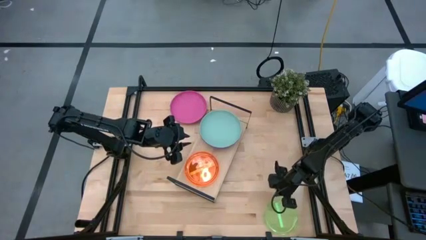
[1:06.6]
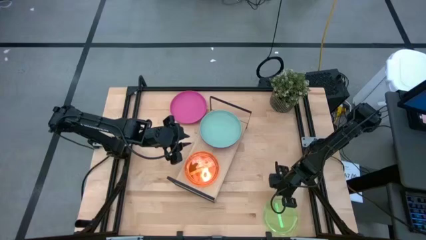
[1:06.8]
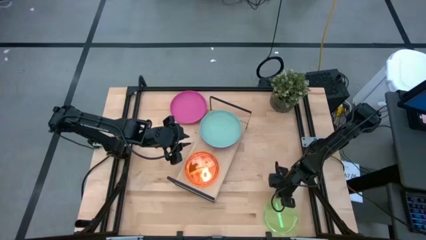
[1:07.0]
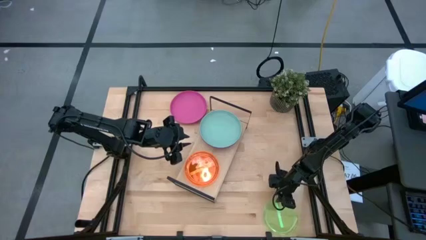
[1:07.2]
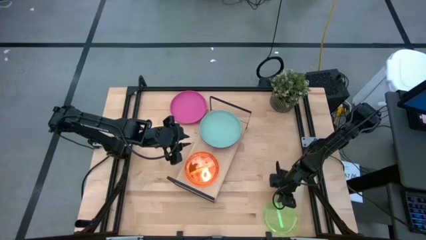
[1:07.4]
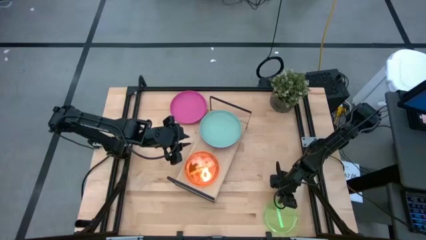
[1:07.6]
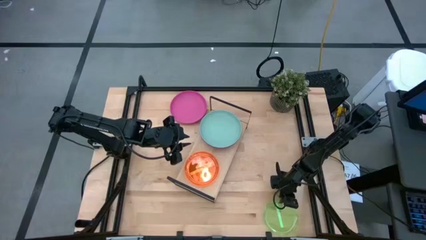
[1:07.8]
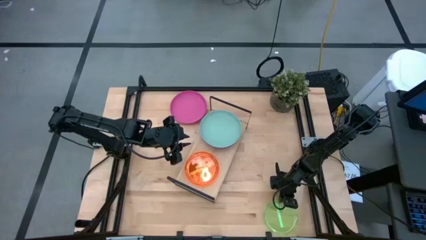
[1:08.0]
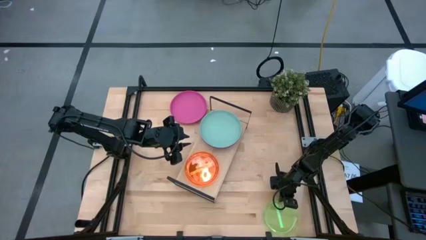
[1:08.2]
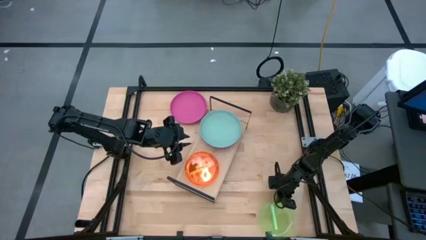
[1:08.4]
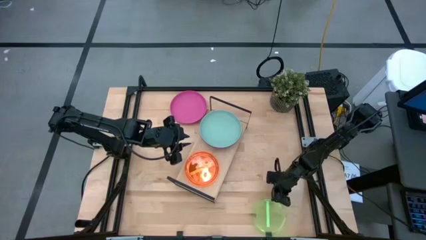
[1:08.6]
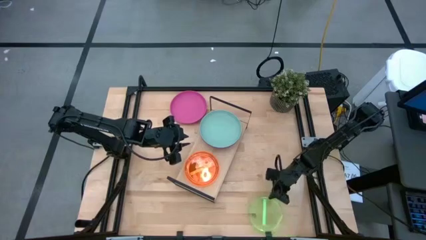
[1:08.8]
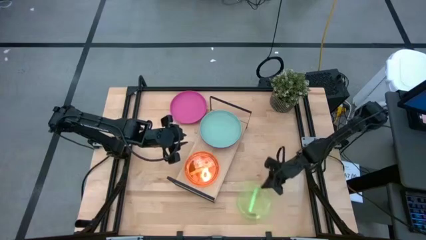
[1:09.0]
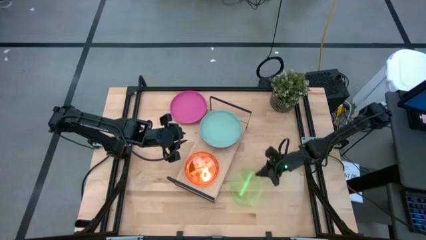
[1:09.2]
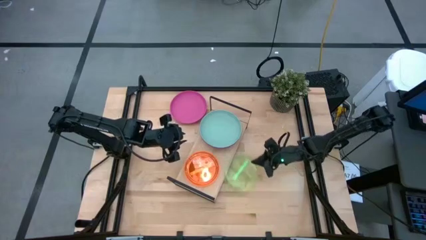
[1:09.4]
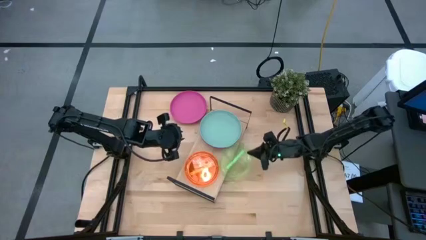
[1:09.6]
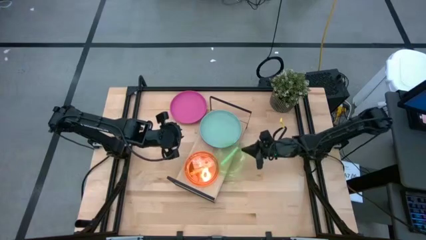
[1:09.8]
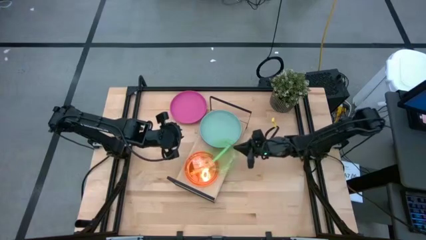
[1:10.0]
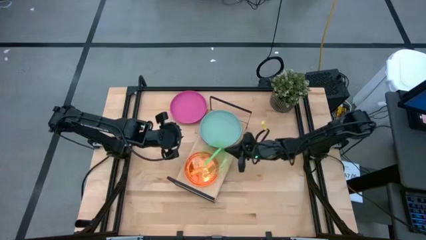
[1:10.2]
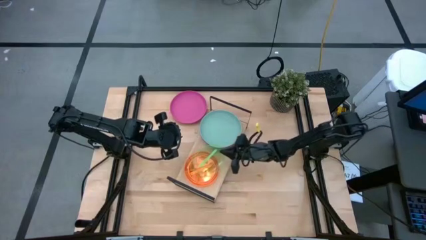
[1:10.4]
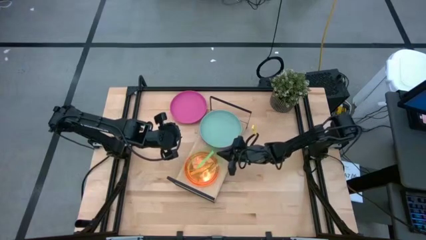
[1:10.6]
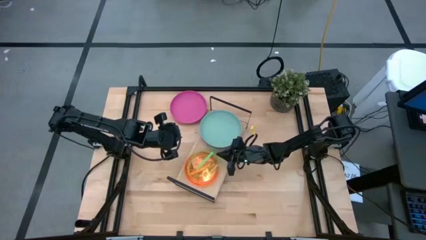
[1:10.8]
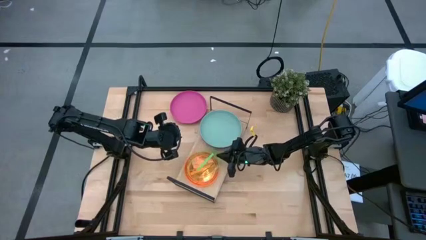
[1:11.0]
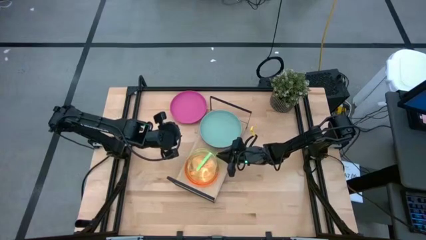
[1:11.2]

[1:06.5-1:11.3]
Task: Place and stack plates onto a shelf
Stack the green plate on top of the orange plate on the shelf

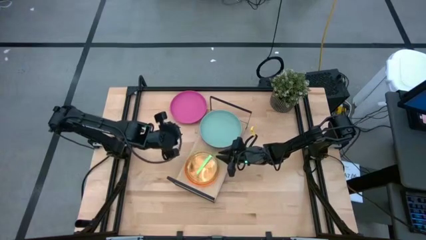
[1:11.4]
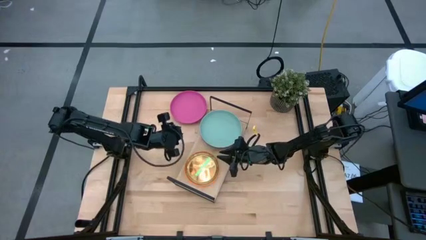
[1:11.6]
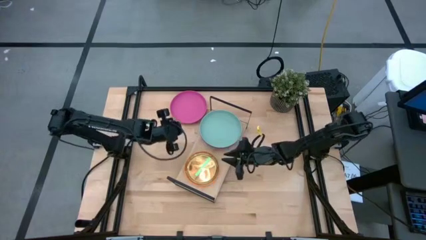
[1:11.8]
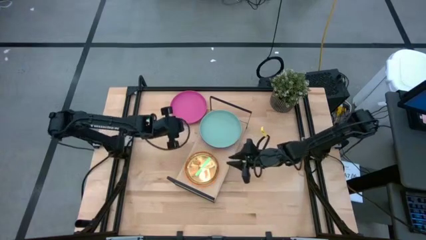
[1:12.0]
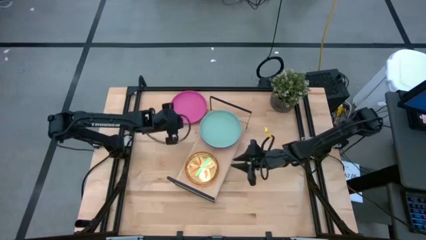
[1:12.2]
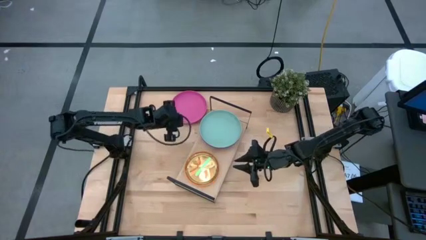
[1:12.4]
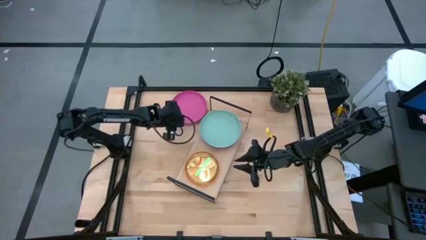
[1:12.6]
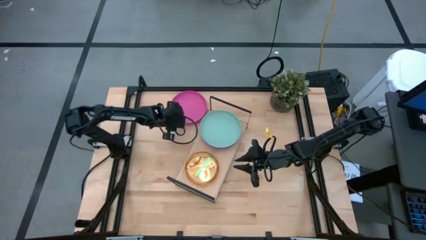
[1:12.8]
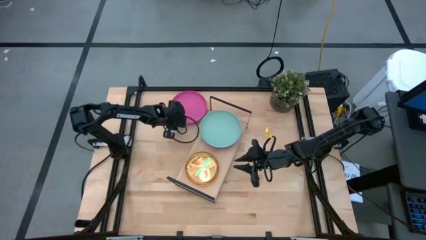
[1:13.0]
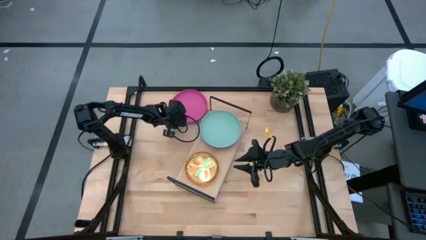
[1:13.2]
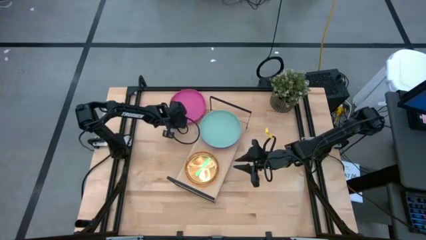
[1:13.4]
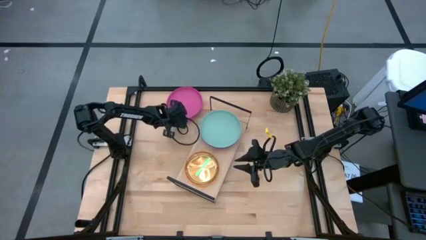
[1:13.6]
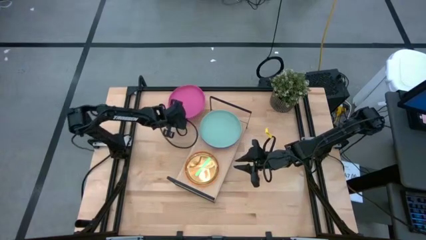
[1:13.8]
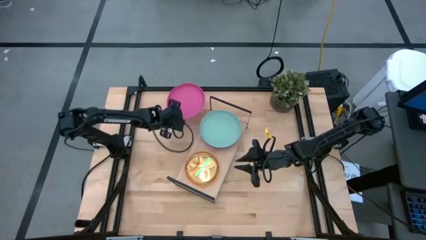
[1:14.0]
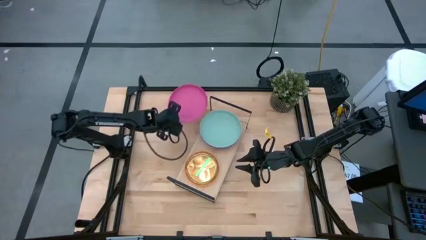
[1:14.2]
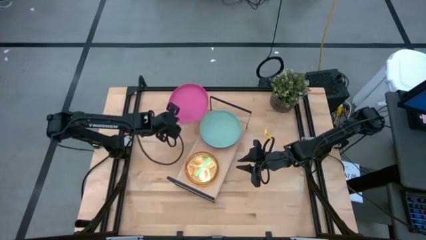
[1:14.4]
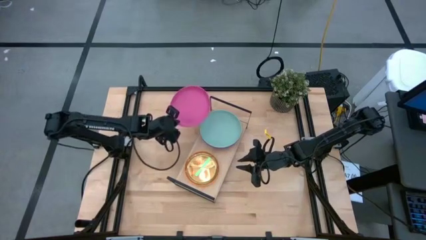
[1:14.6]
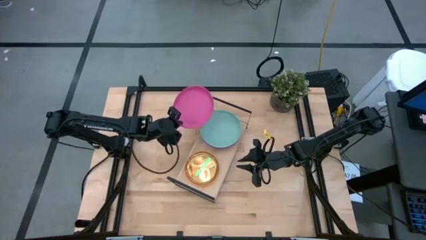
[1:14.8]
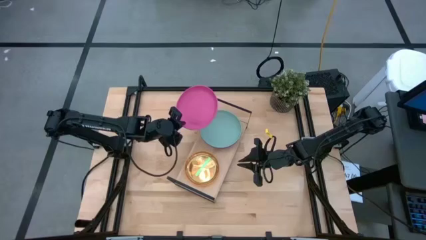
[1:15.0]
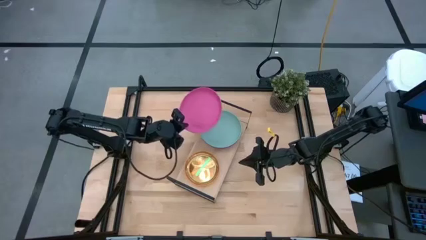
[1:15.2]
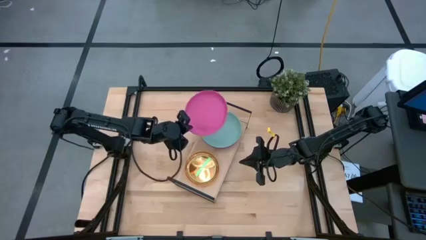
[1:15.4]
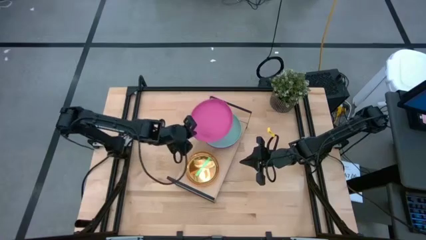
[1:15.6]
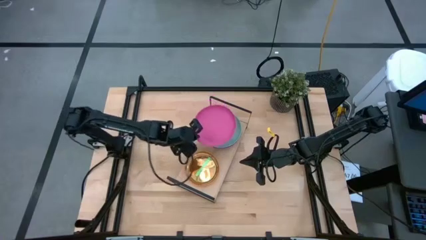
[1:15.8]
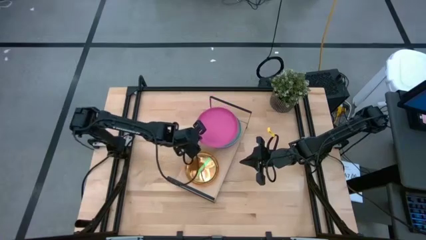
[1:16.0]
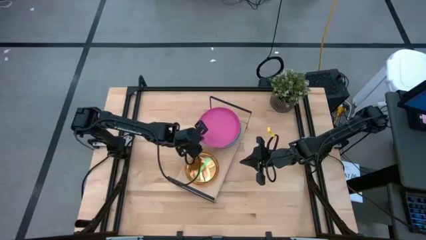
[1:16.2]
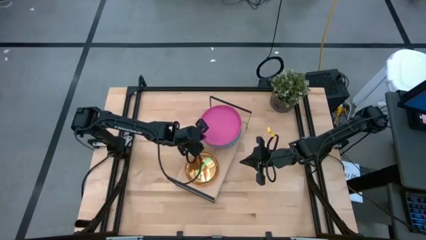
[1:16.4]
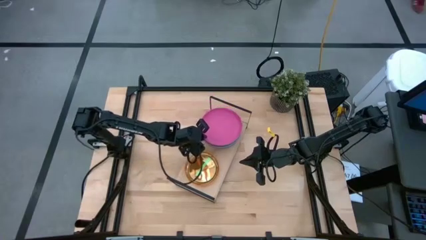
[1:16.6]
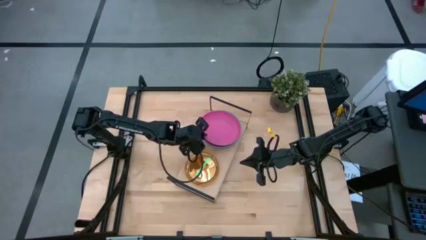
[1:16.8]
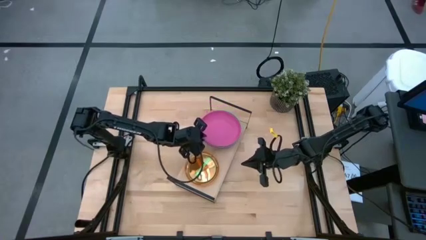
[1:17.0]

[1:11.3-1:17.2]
Stack the pink plate on top of the blue plate on the shelf

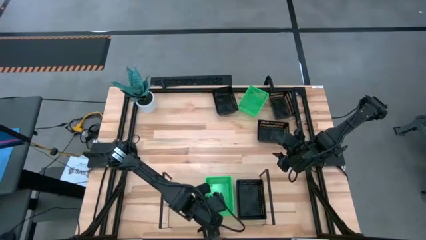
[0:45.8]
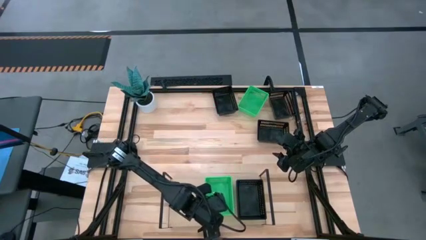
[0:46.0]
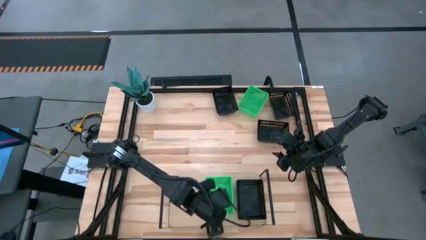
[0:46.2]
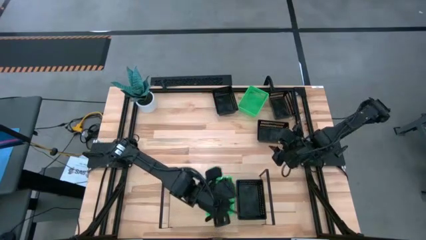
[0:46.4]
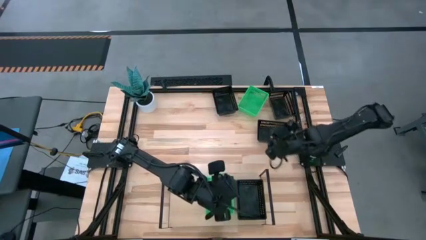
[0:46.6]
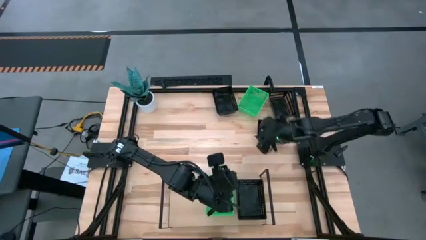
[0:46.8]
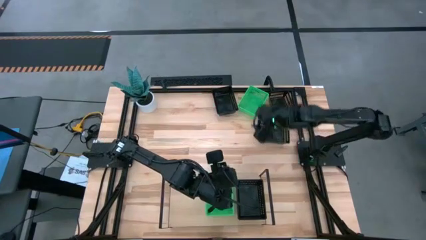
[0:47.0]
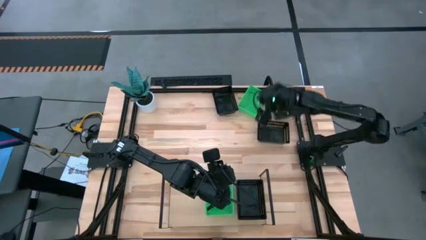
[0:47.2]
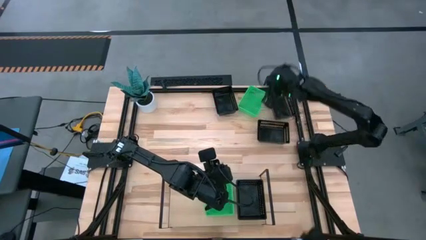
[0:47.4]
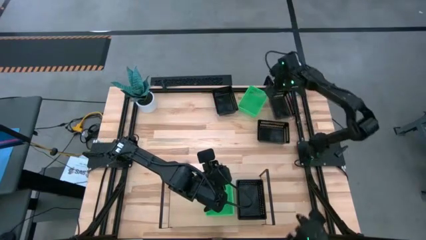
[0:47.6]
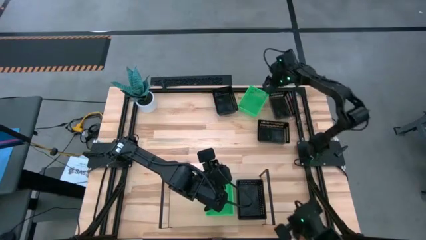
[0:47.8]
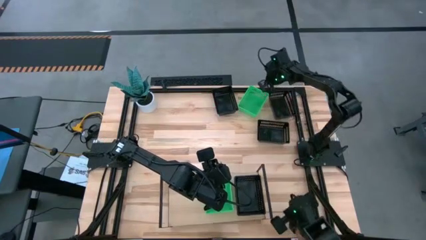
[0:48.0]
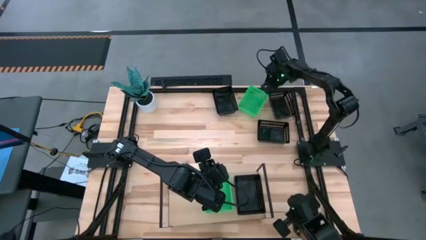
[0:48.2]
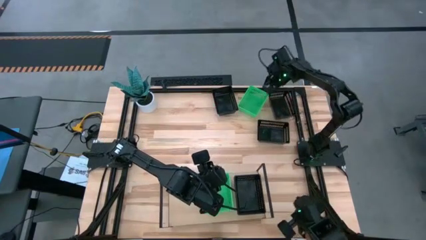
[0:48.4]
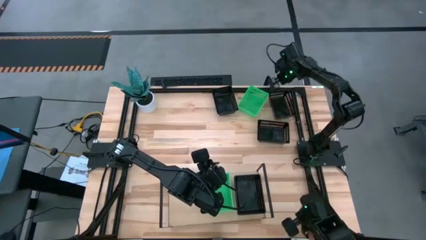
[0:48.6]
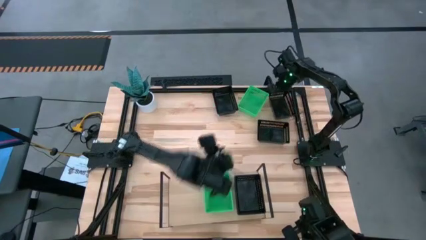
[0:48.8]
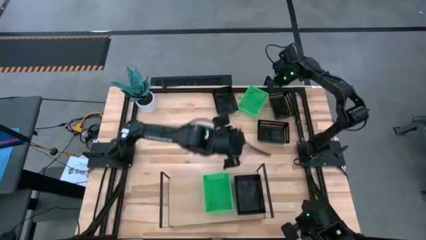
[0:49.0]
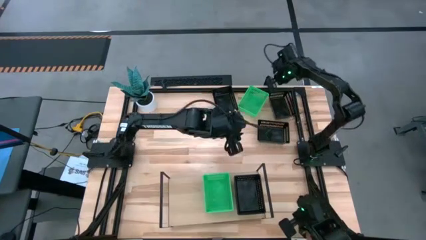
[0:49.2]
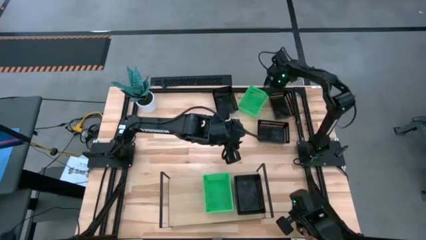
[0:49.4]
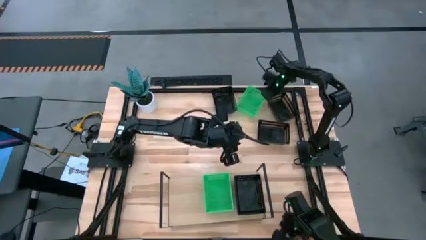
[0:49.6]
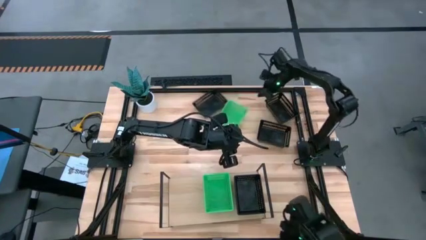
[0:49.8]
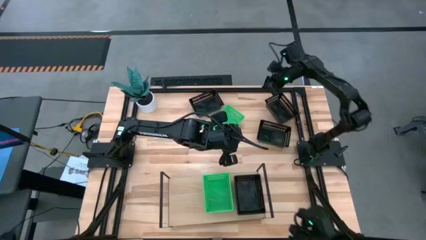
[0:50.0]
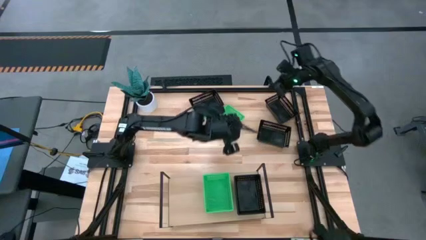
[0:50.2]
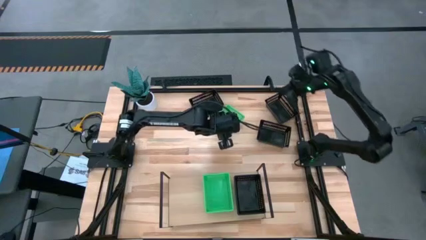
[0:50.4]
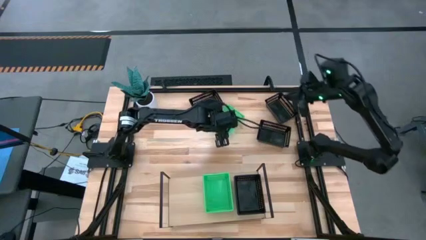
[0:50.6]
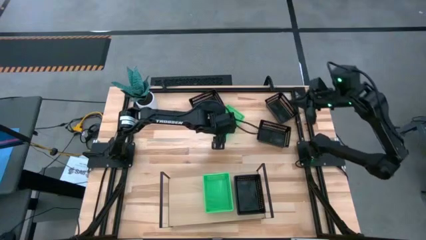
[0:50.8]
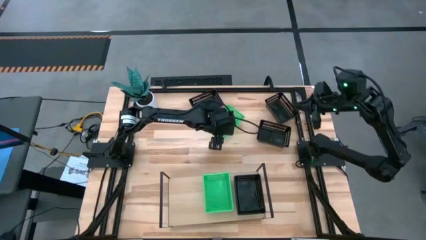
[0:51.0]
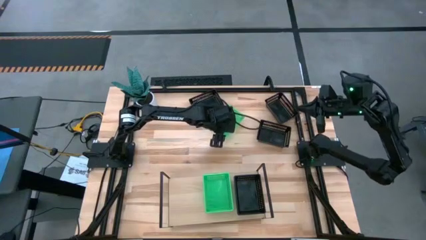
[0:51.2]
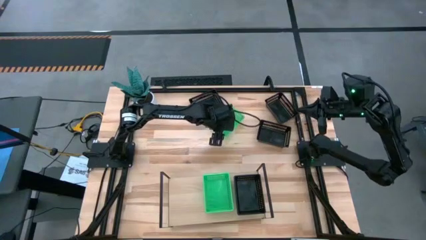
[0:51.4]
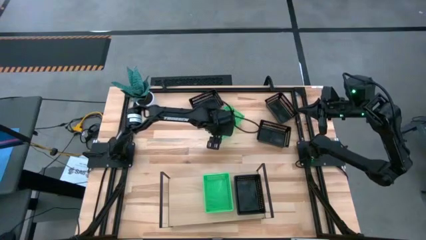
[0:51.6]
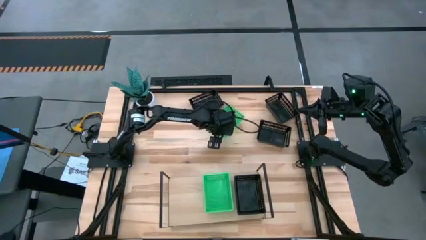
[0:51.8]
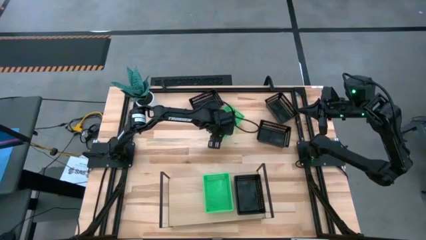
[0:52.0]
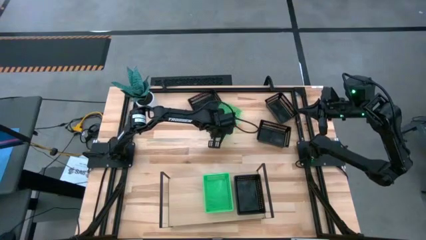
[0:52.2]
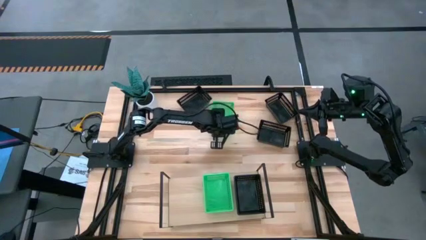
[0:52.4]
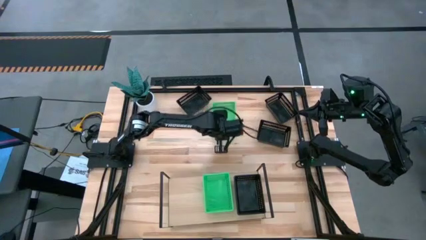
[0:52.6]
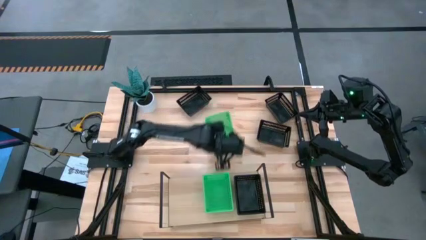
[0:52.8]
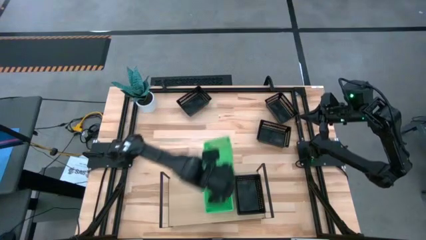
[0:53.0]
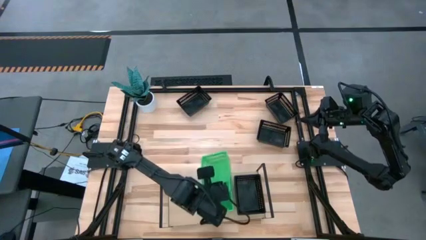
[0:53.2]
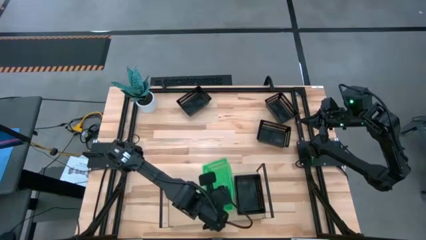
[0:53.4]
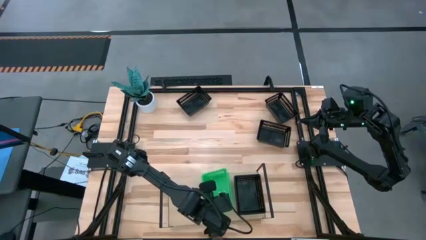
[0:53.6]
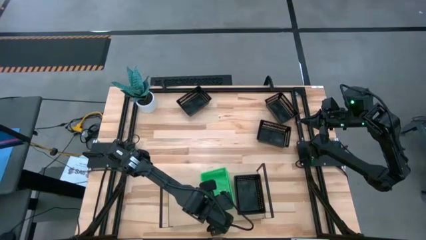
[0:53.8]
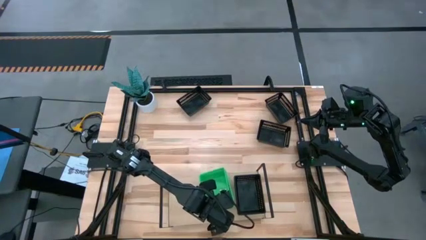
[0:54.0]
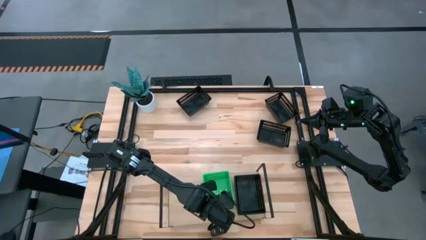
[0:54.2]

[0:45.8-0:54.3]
Task: Stack baskets on shelf by color
Stack the green bin on the green bin on the shelf
